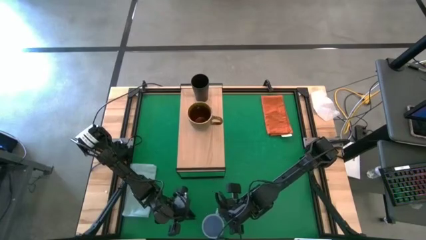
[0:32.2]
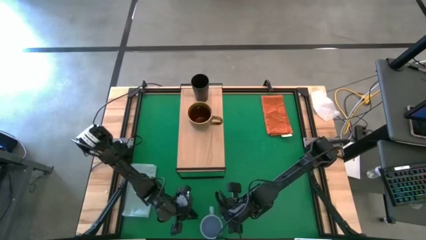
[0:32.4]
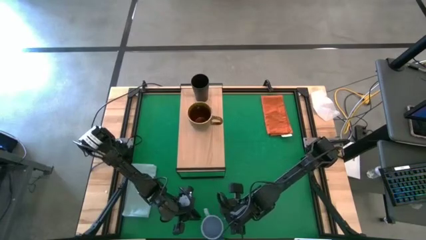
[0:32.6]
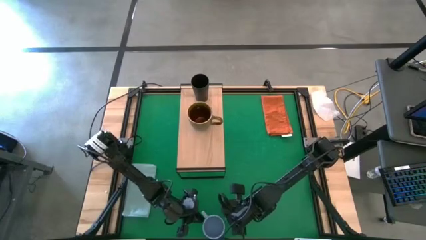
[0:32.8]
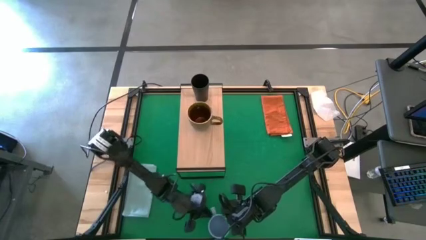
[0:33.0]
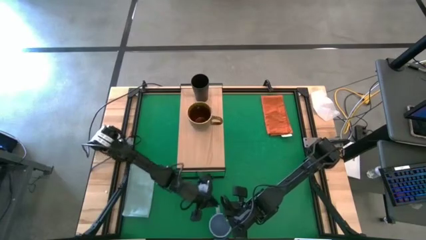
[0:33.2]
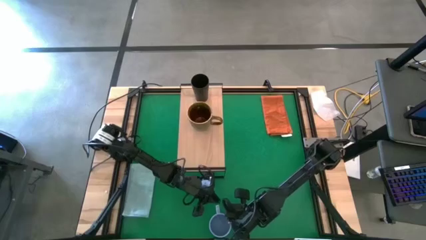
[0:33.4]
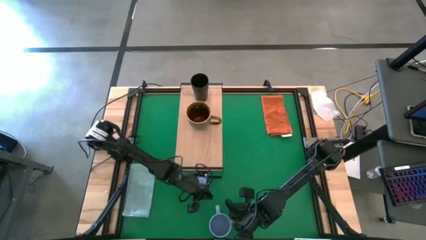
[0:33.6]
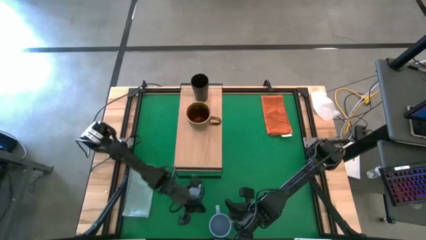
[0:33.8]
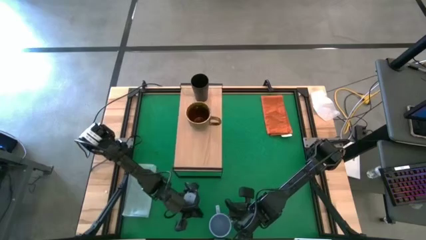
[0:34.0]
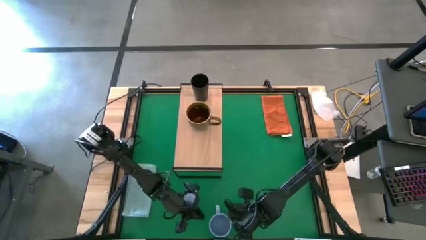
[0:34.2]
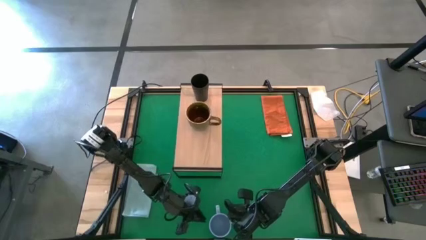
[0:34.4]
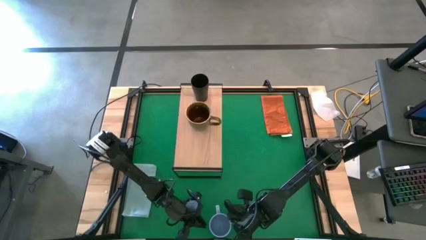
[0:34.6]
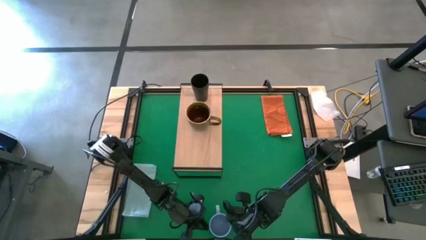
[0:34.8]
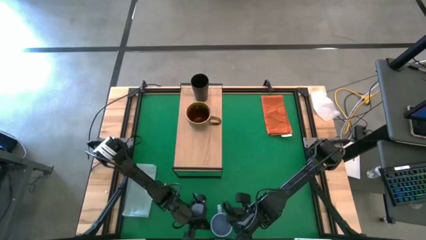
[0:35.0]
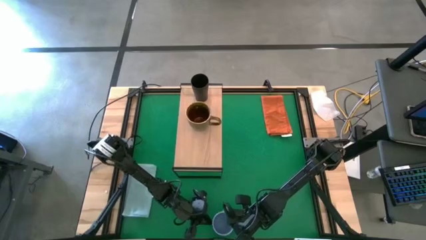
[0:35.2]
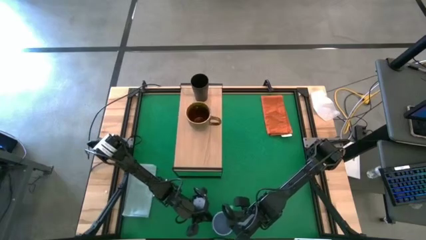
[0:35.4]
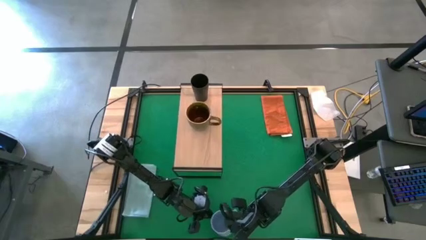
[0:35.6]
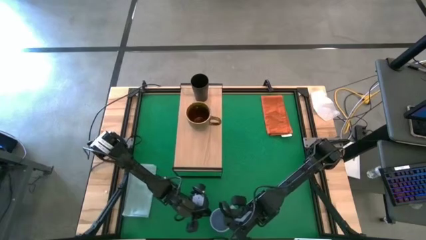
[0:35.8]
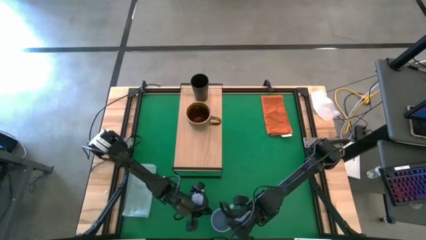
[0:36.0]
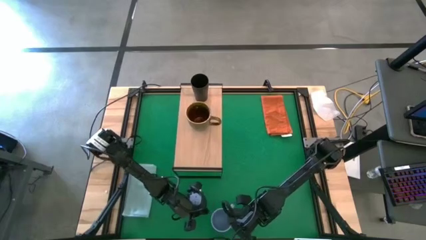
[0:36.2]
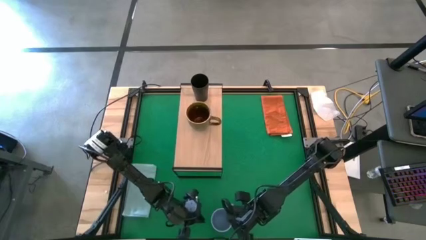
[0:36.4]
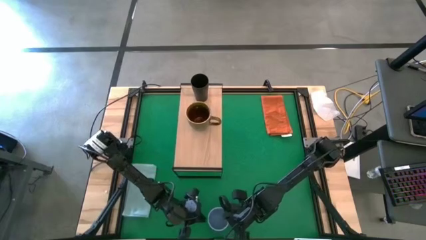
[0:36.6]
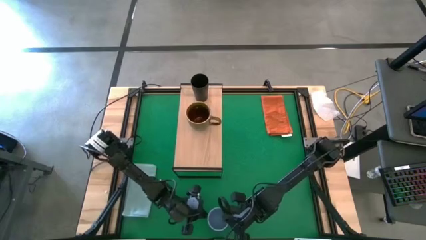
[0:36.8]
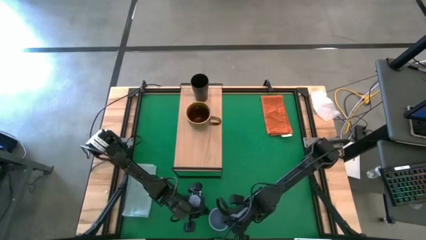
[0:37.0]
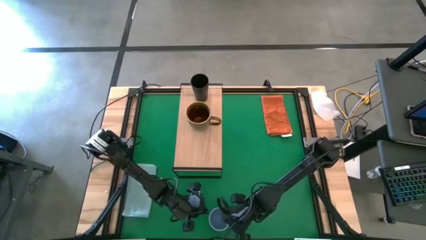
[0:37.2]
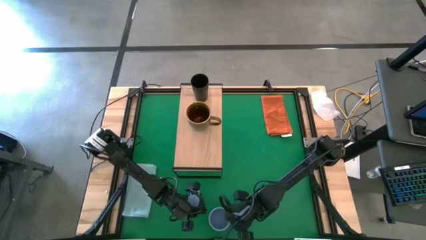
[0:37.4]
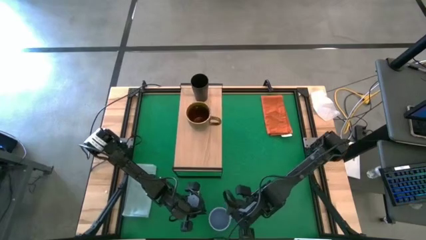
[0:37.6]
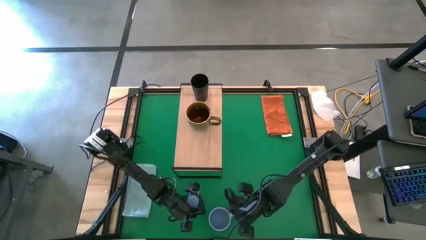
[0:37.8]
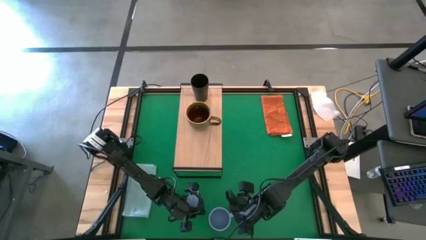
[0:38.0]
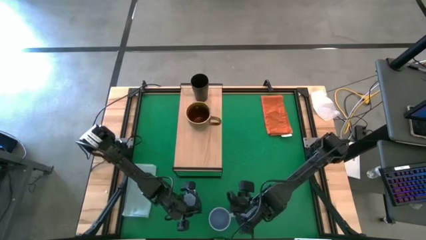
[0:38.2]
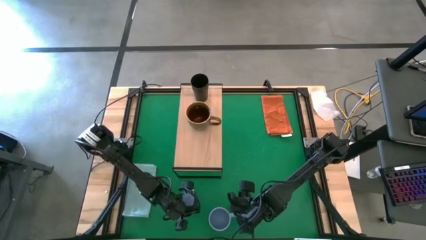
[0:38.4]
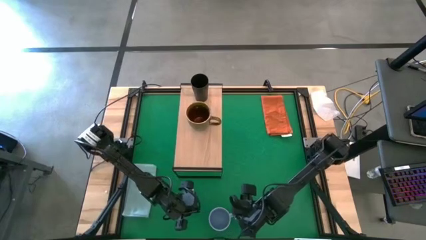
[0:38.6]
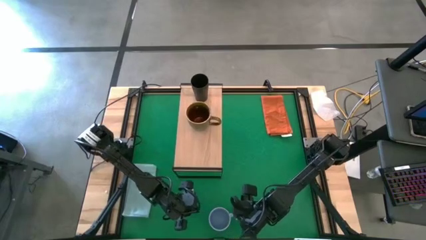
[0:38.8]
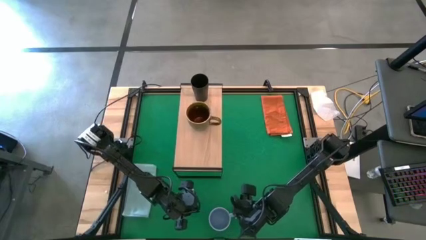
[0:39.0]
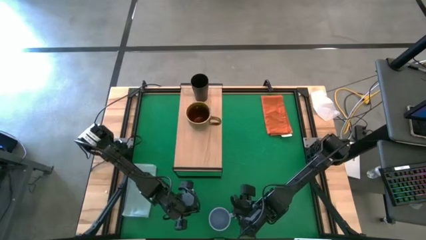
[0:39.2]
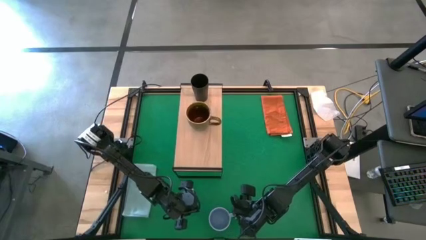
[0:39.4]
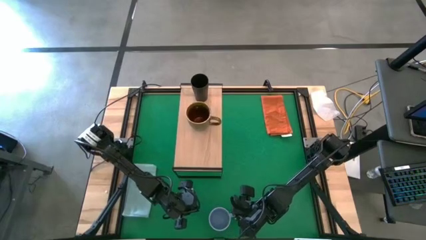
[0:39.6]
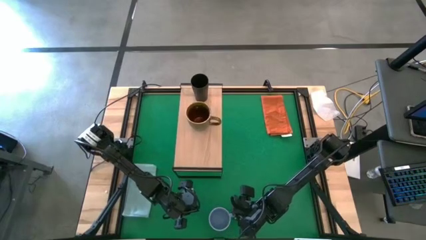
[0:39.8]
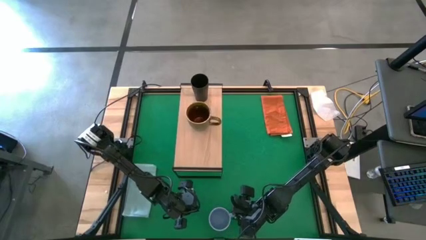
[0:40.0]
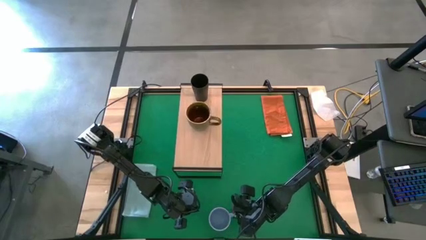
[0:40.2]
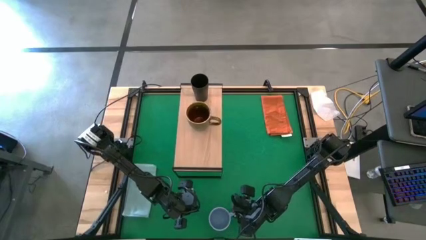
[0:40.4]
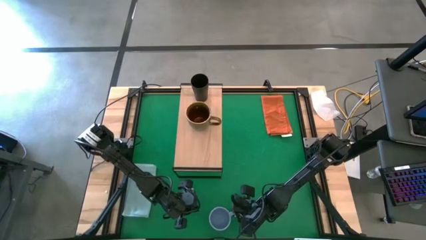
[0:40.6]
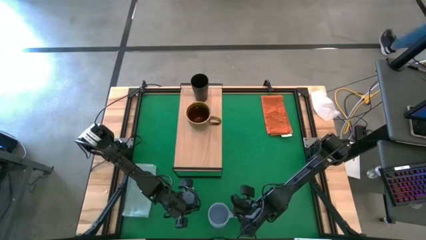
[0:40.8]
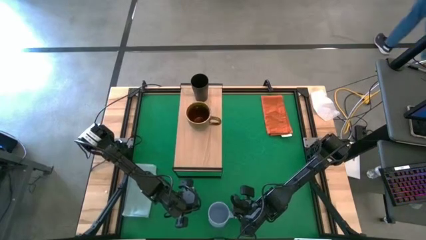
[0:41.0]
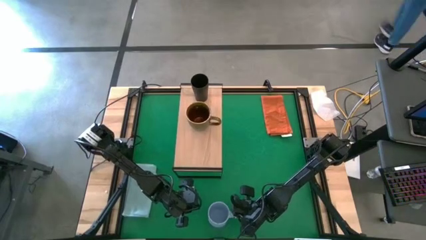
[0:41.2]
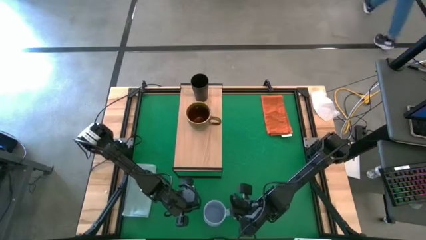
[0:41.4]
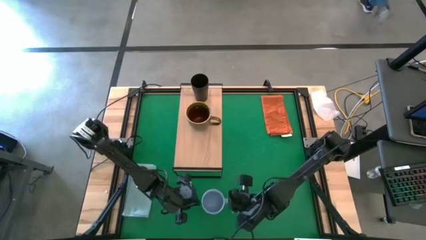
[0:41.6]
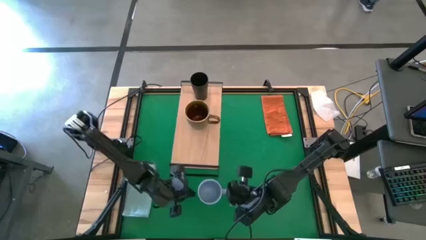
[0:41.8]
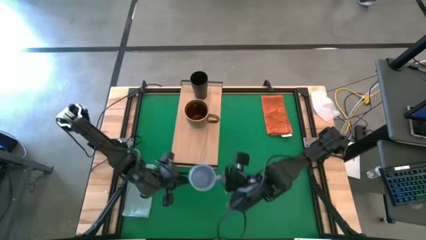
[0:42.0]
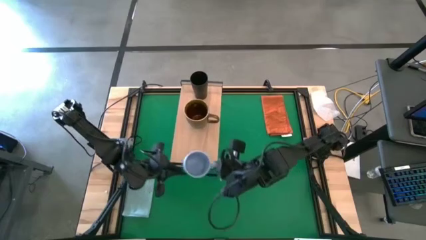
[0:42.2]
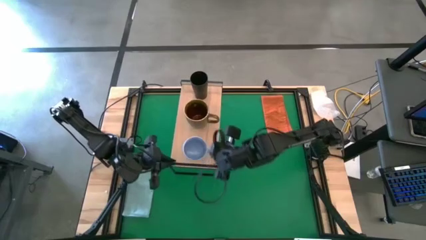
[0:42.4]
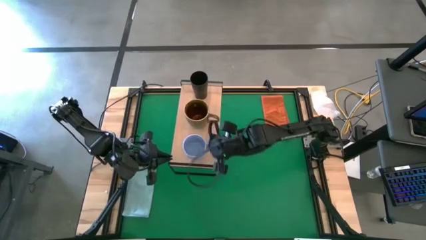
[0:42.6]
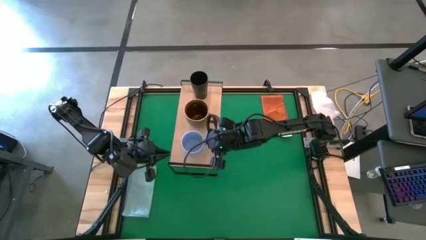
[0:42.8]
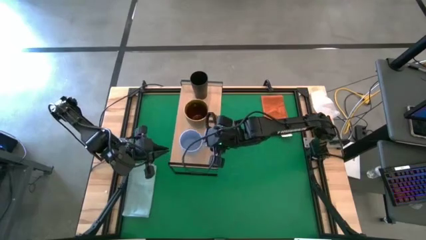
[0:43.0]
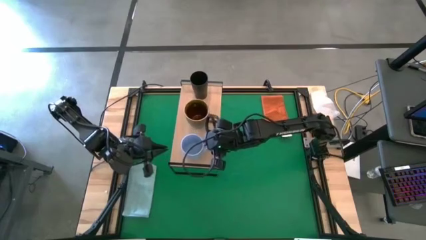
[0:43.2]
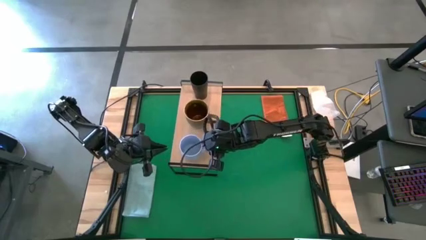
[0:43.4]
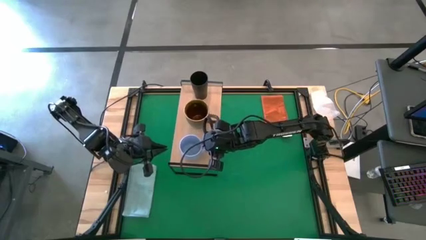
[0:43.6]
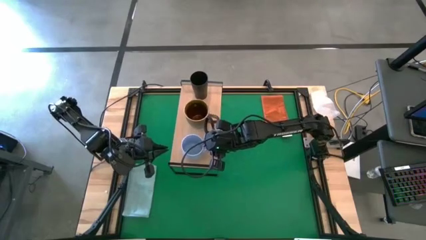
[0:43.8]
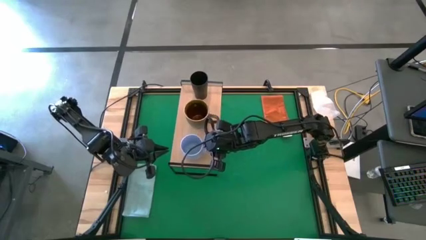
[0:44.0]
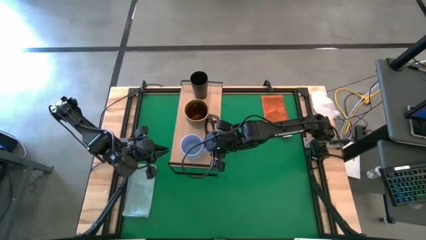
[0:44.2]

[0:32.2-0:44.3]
Task: Stack small to large cups/mugs on shelf
Put the gray mug on the shelf

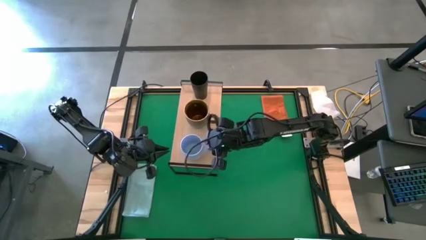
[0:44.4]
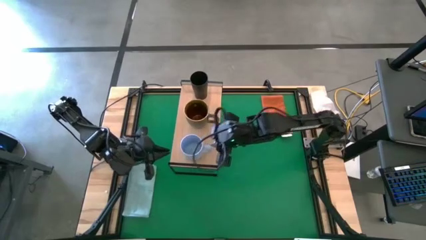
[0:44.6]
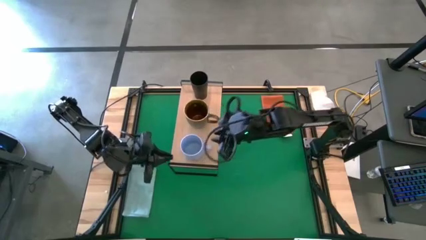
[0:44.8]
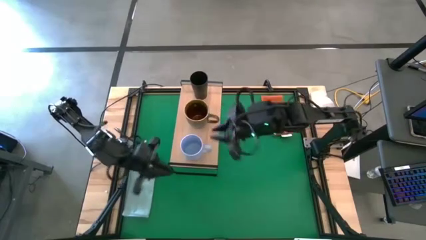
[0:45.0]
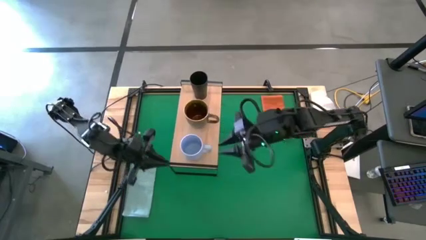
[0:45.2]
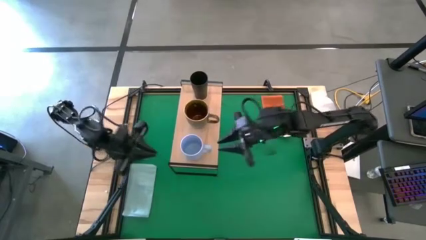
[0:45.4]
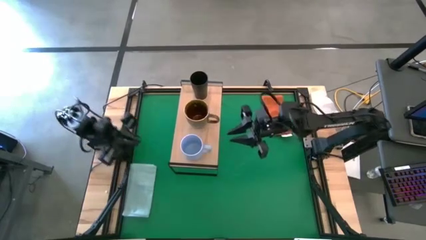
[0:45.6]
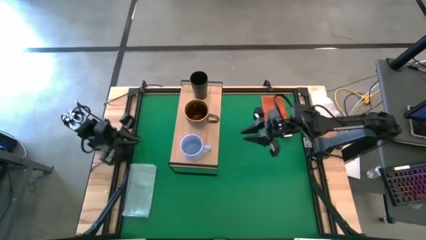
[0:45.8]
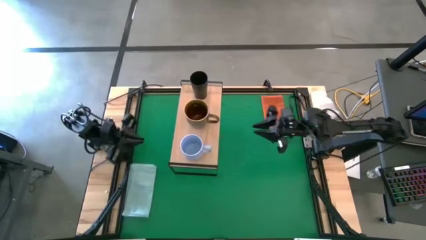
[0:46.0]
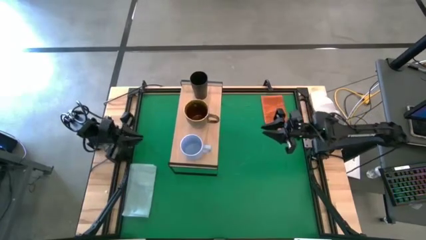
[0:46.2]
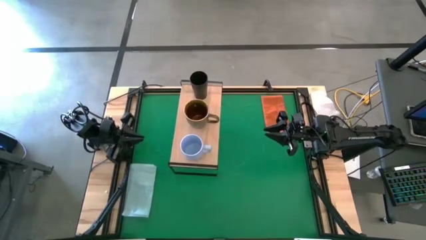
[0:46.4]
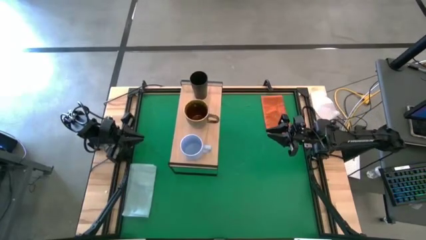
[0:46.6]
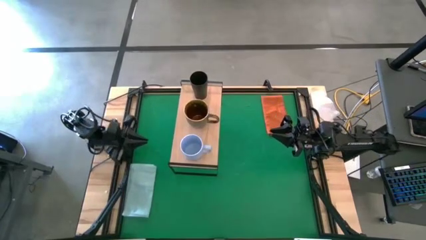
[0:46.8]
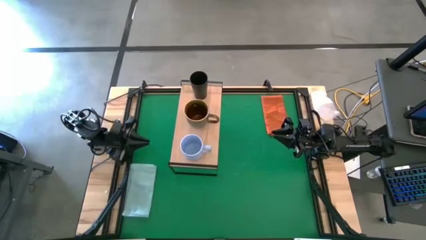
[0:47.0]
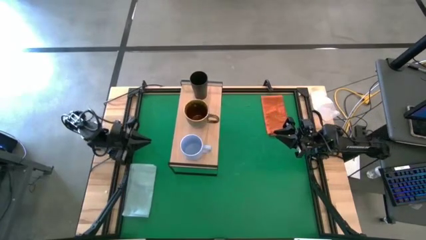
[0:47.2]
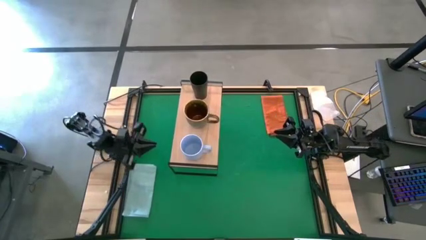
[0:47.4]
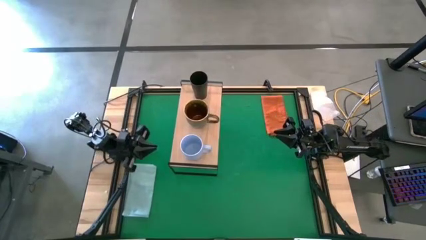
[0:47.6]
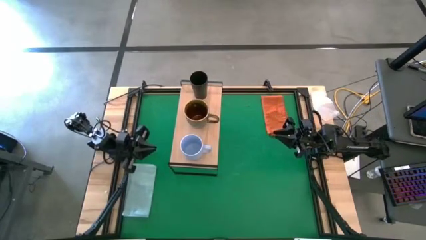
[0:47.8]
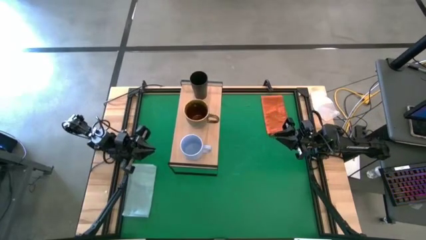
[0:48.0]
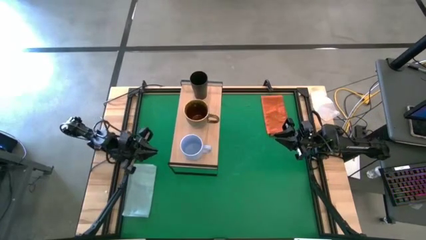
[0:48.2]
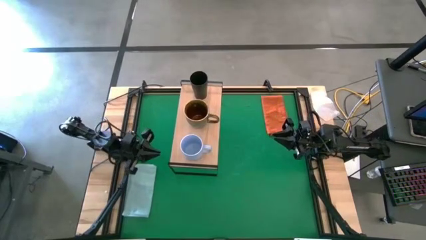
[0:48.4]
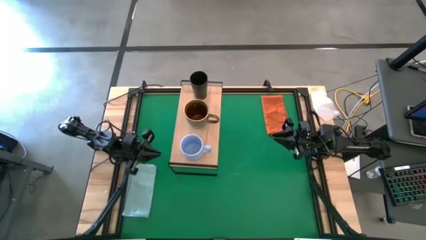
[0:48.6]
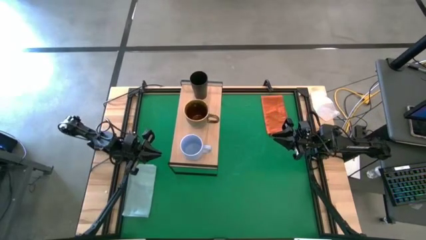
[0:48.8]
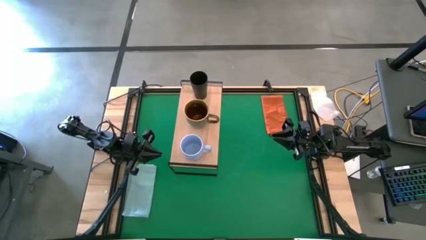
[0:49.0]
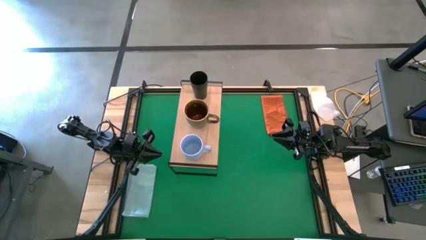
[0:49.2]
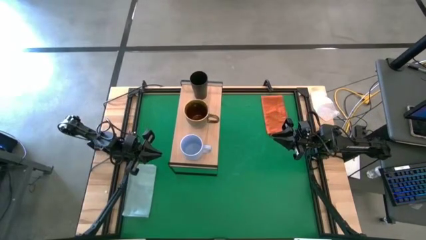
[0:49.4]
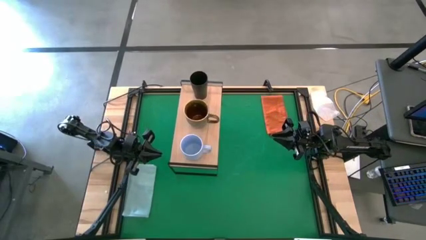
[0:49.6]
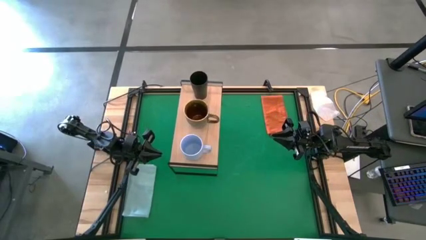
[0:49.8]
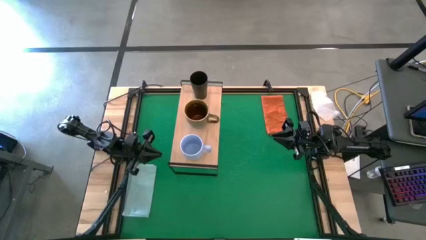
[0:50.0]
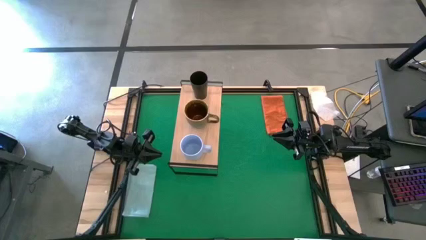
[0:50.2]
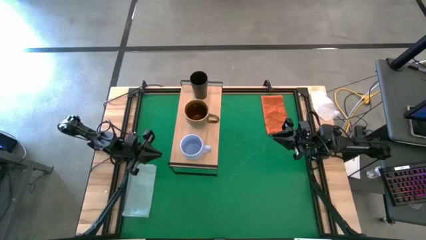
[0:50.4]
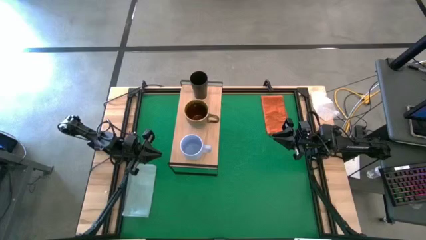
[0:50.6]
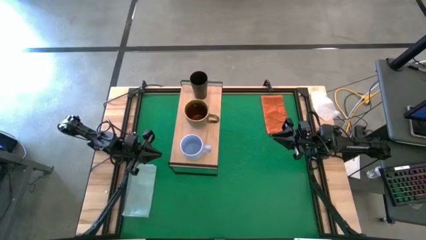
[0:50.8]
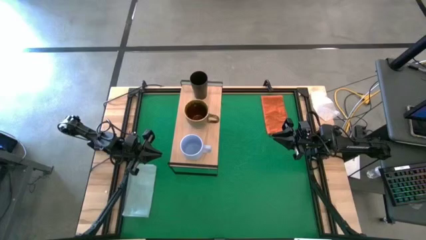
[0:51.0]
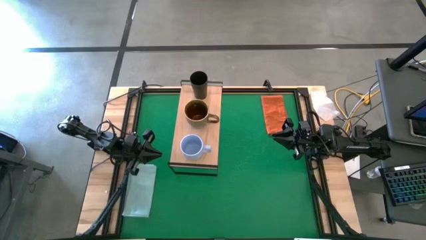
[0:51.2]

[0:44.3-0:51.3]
Return to Home Position
